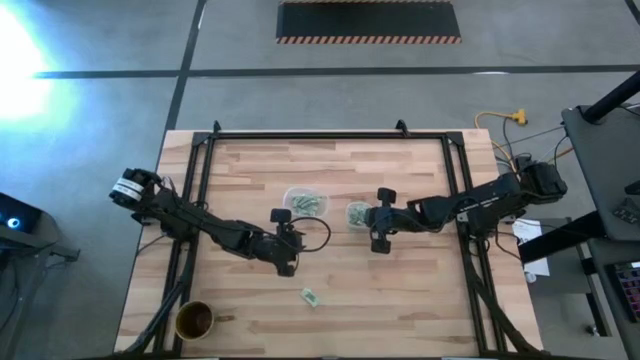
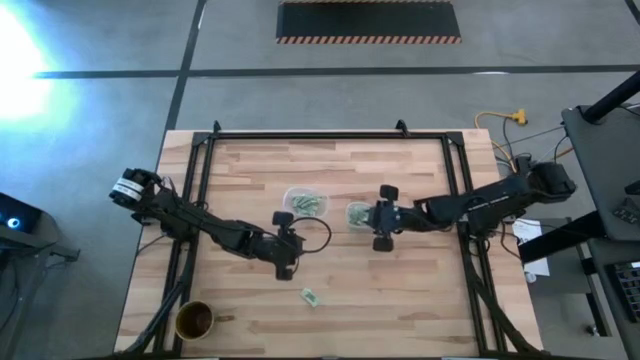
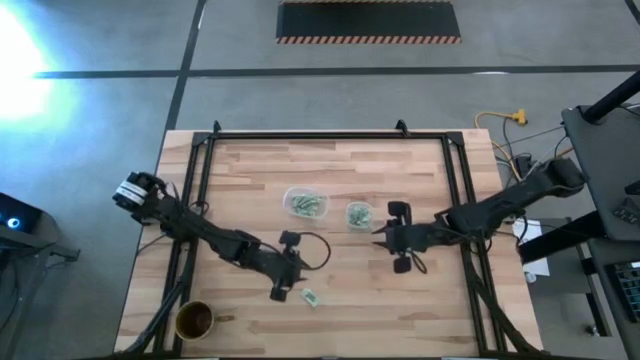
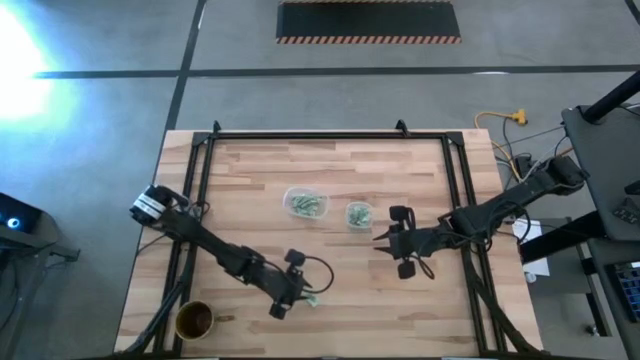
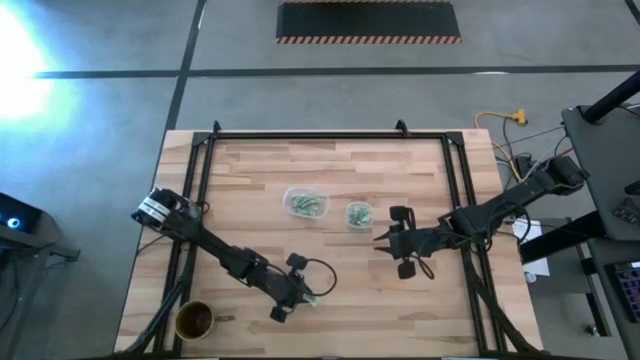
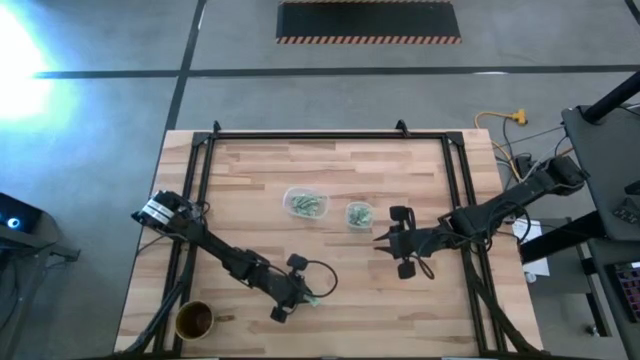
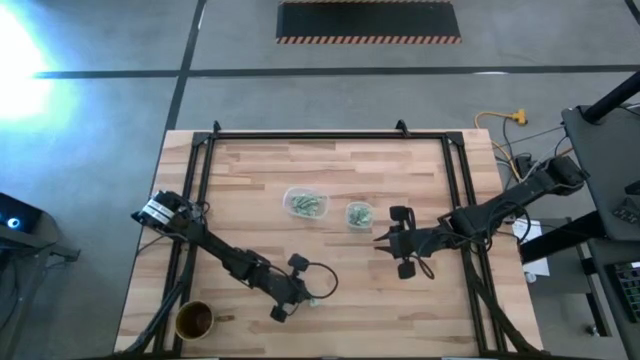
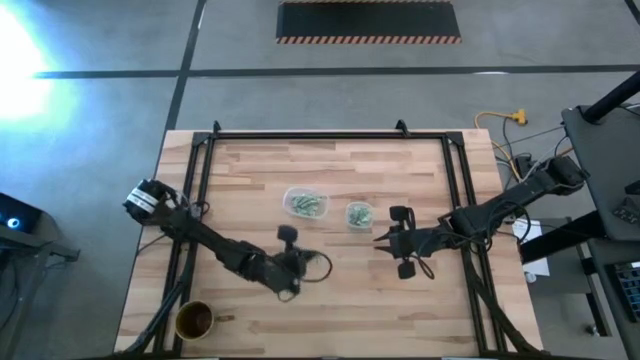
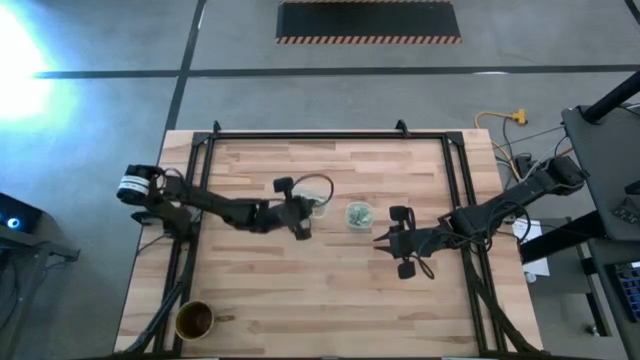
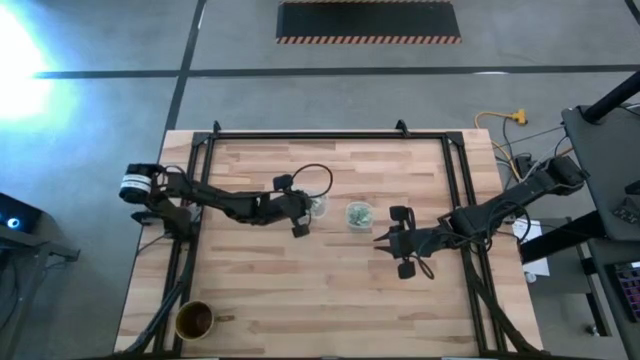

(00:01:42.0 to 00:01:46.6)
Task: Pick and place items into bin
Put the green stevia packet into the left transparent bin

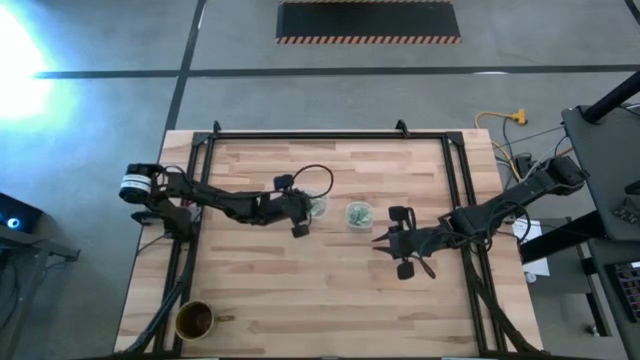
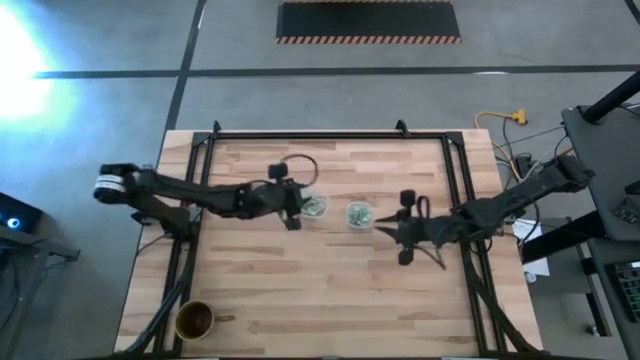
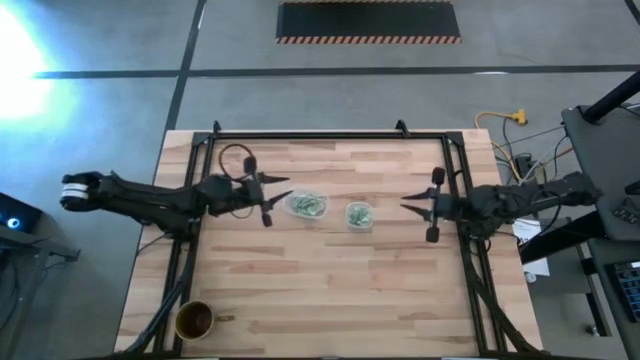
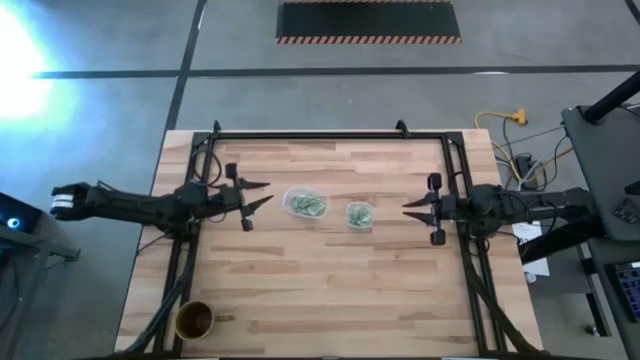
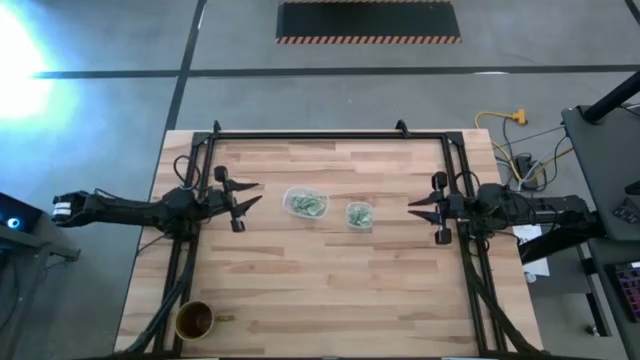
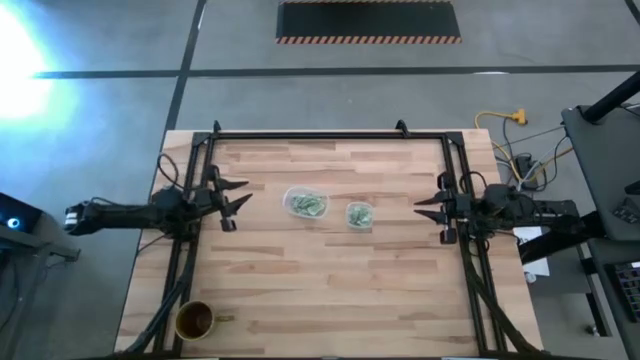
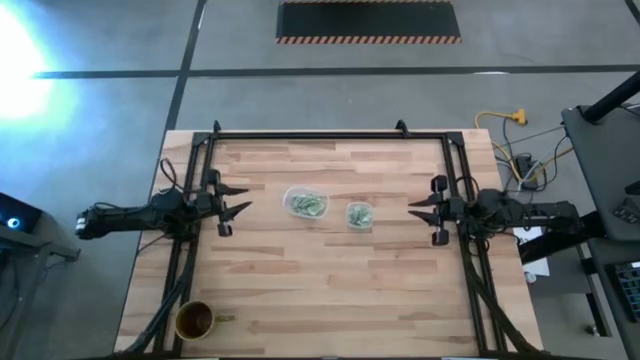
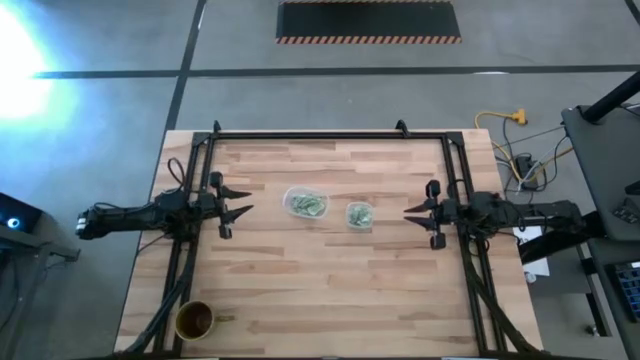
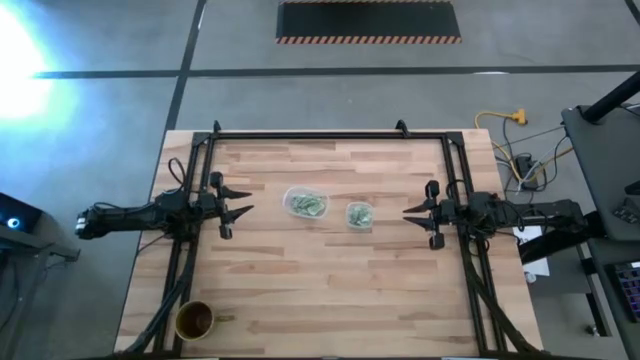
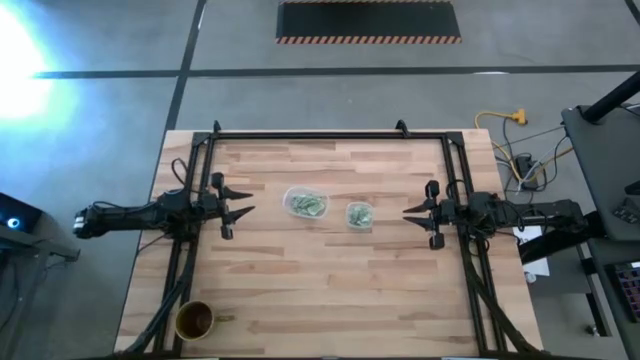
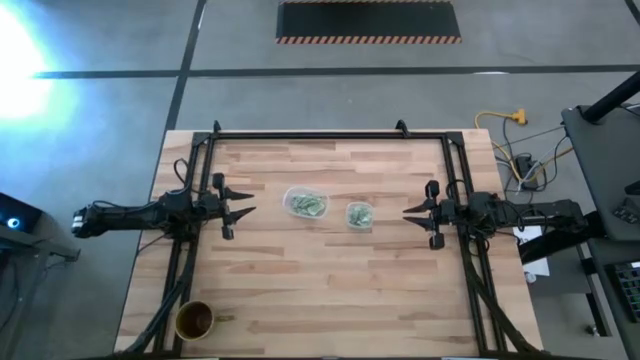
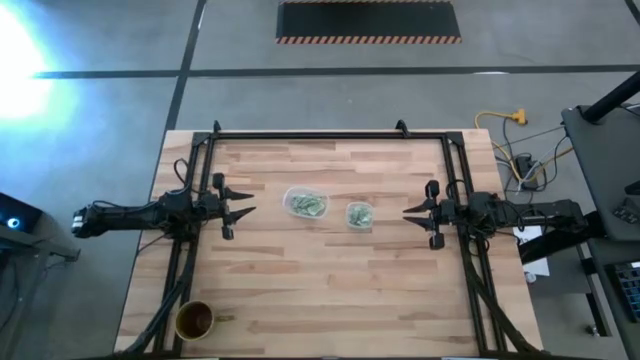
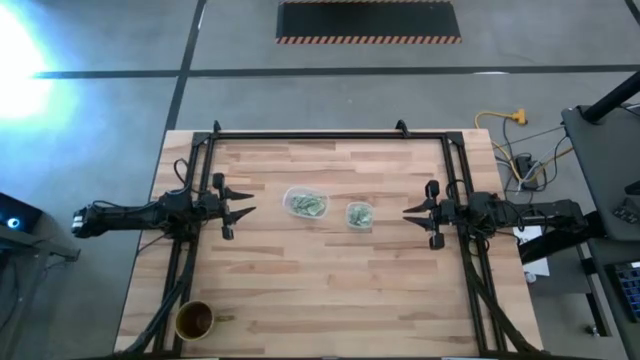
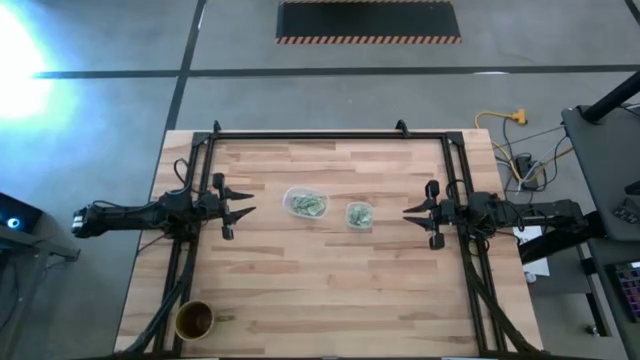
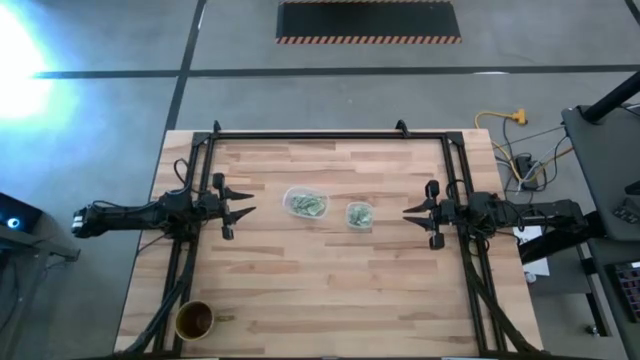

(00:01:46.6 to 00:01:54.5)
Return to Home Position

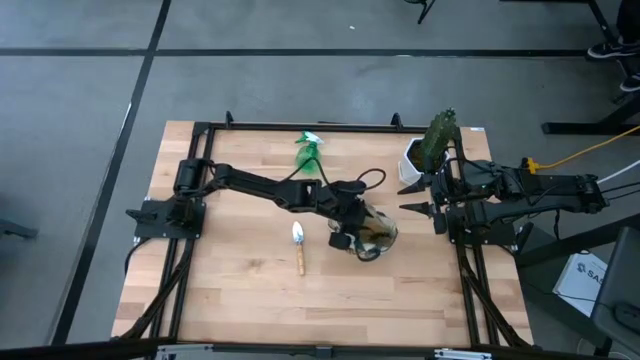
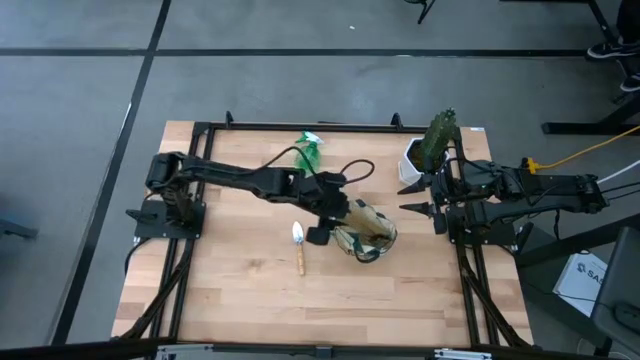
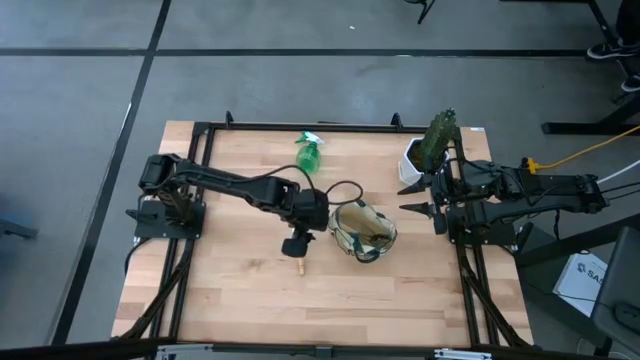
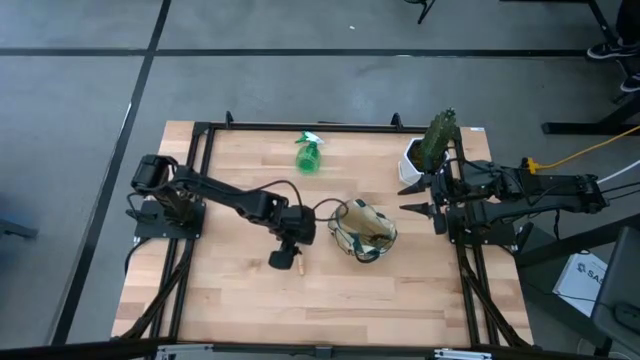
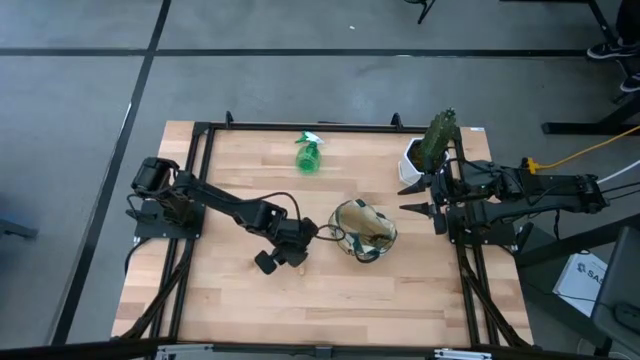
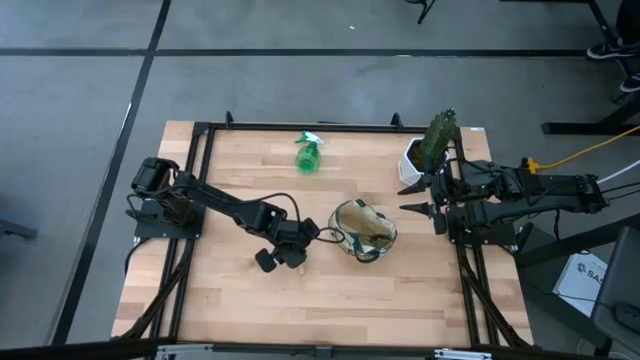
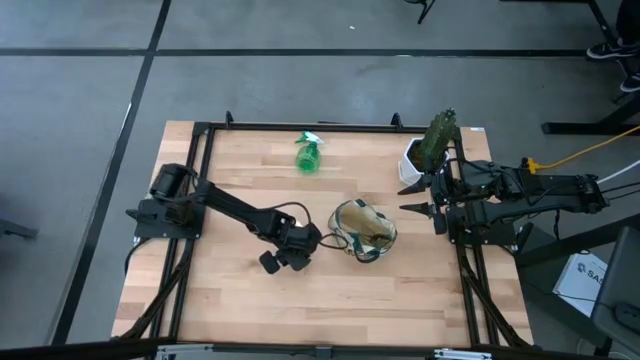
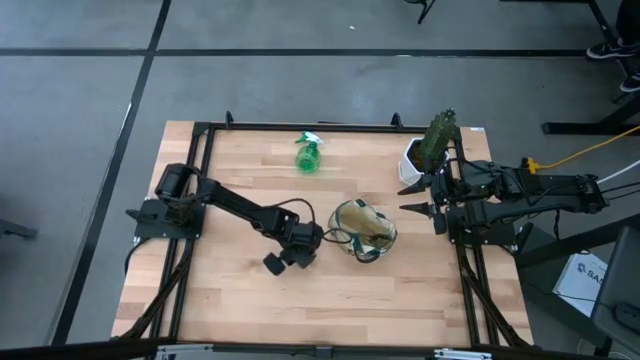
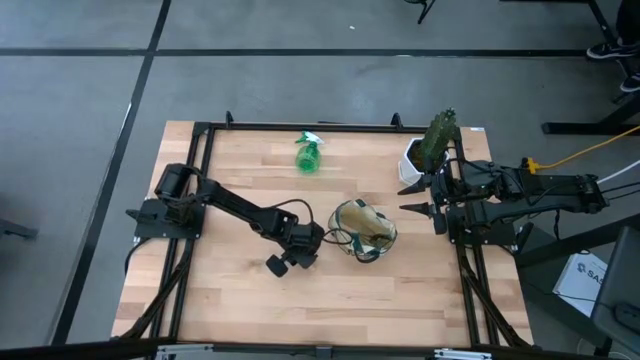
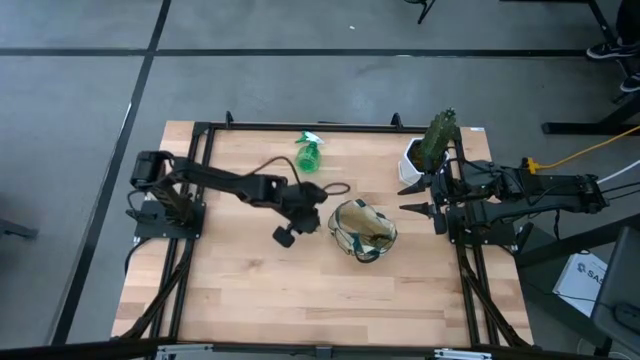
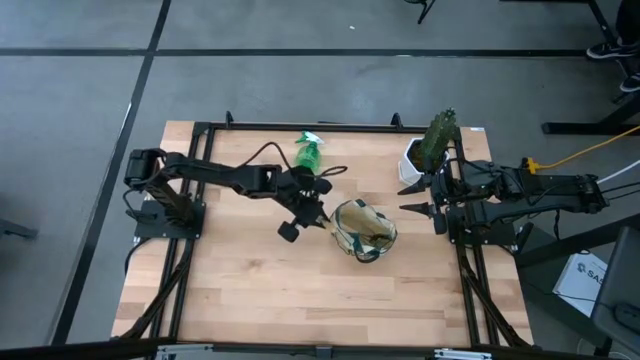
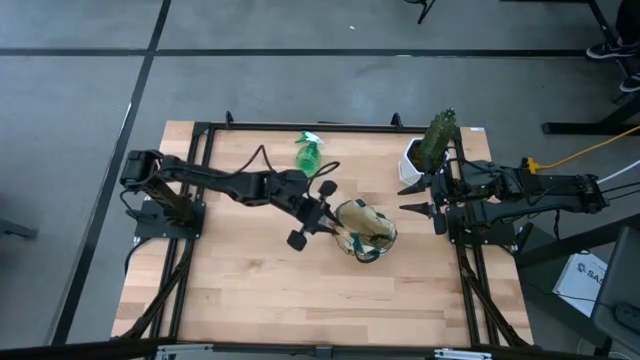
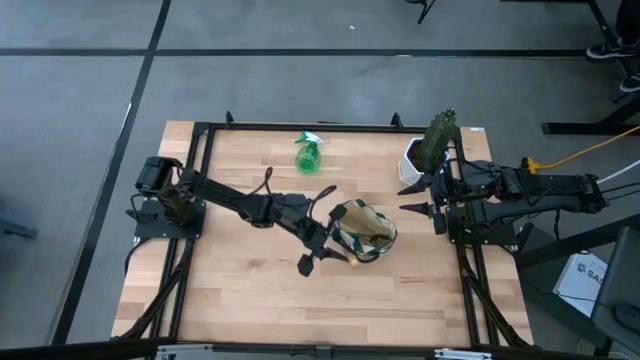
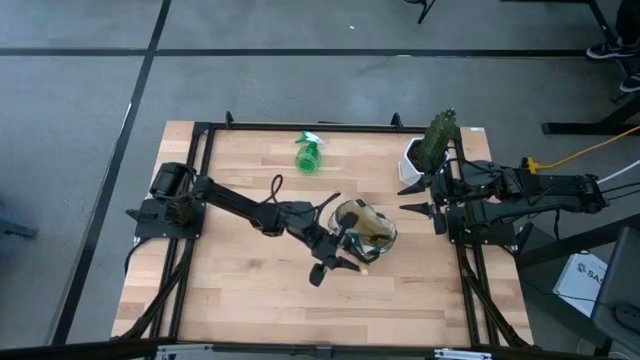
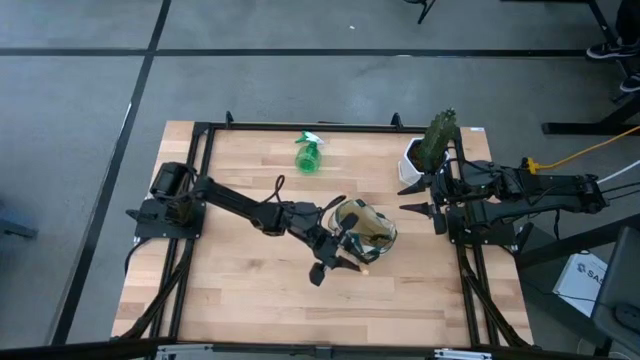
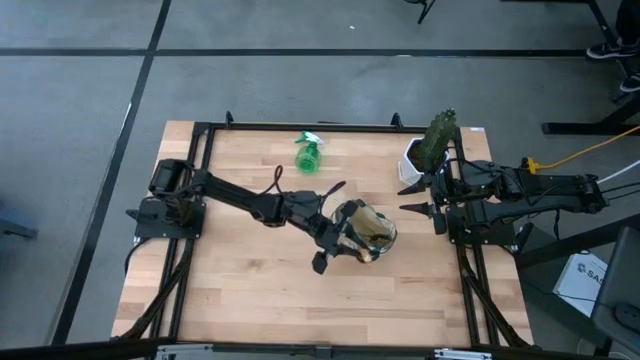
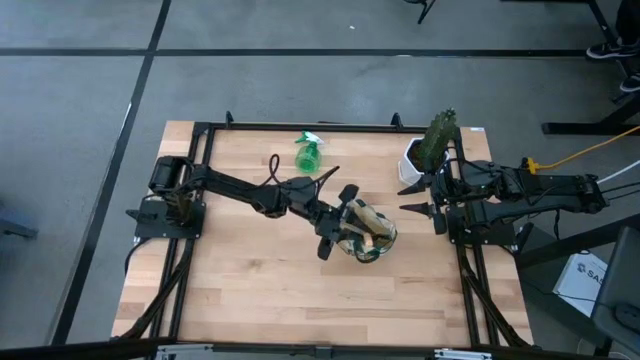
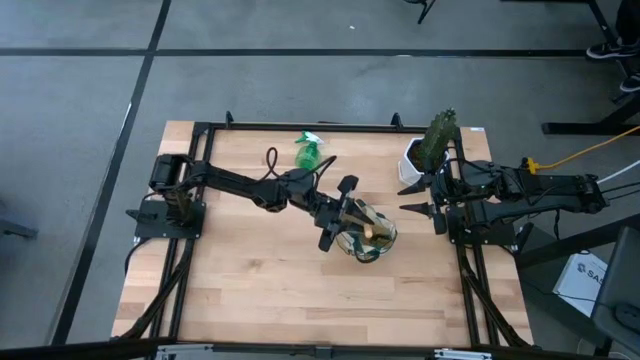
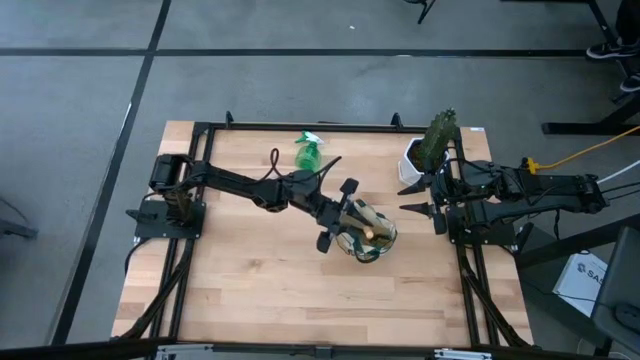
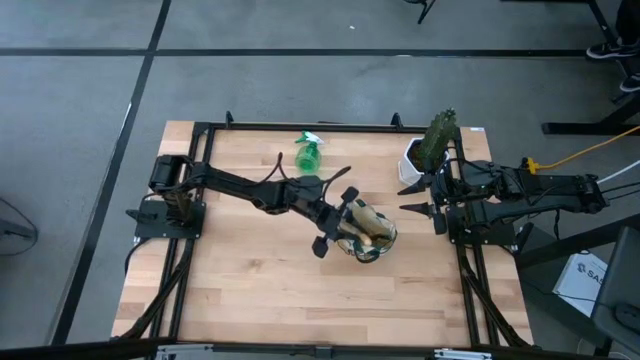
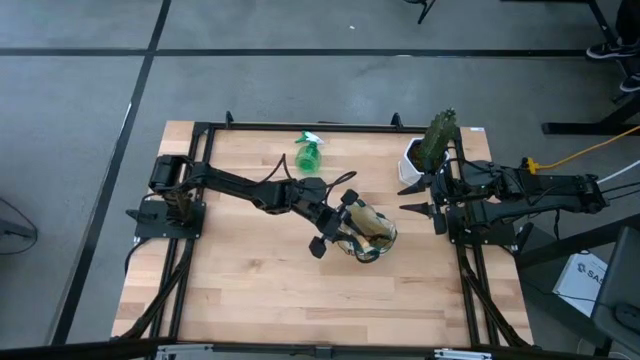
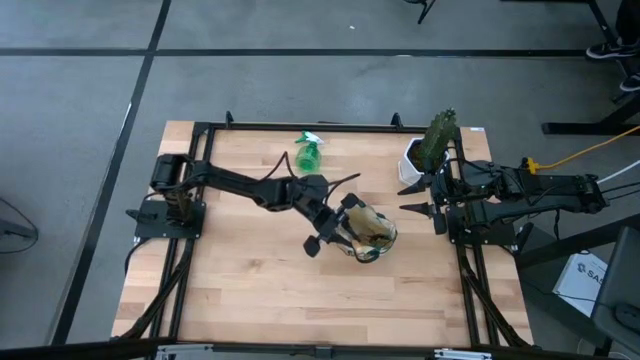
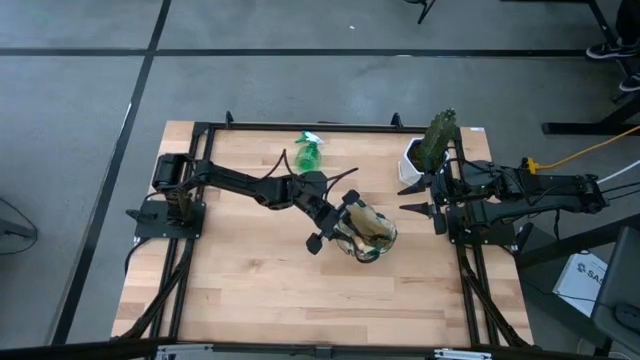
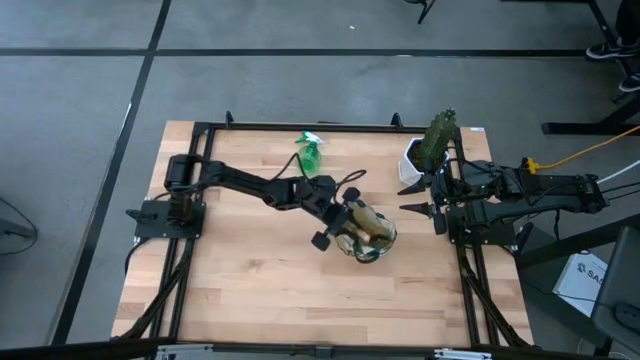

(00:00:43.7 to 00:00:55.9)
Task: Pick & Place Garden tools in Gardening bag
Put the brown trowel into the light brown gardening bag
